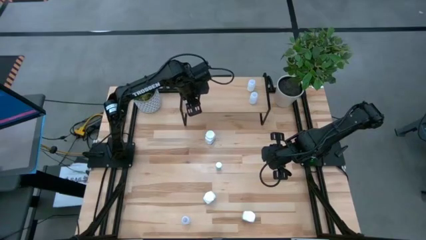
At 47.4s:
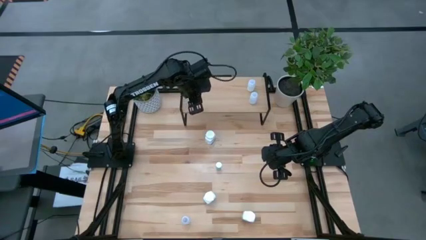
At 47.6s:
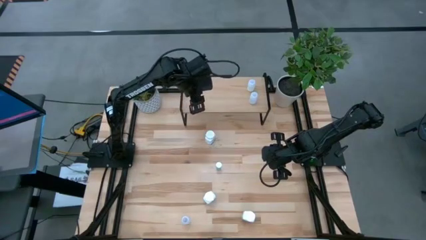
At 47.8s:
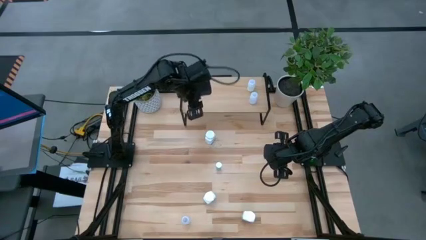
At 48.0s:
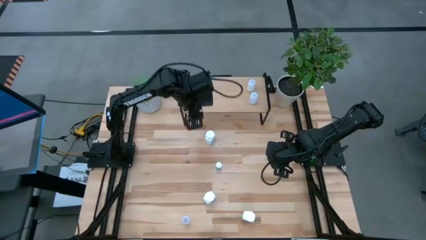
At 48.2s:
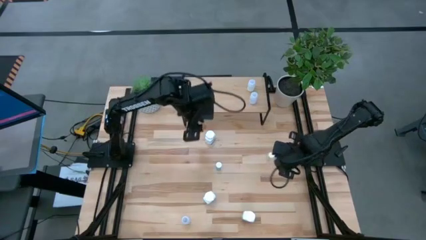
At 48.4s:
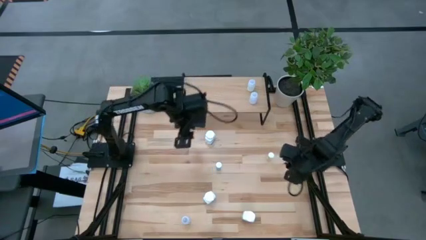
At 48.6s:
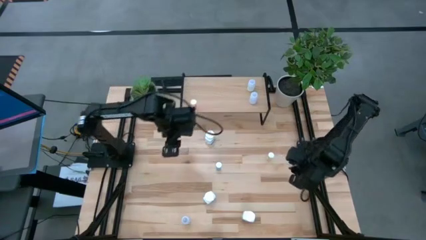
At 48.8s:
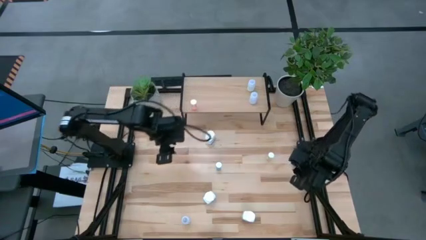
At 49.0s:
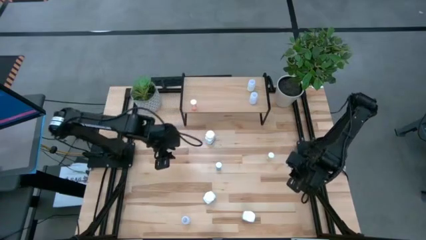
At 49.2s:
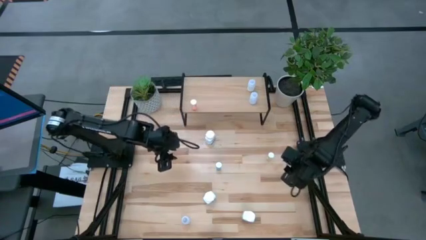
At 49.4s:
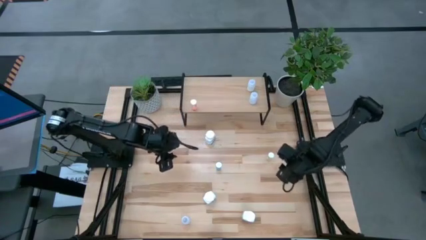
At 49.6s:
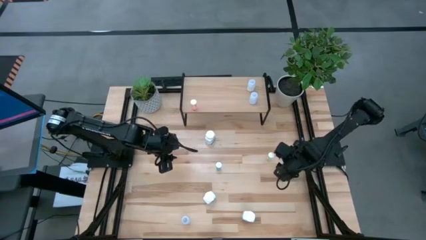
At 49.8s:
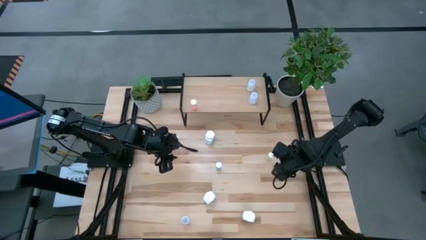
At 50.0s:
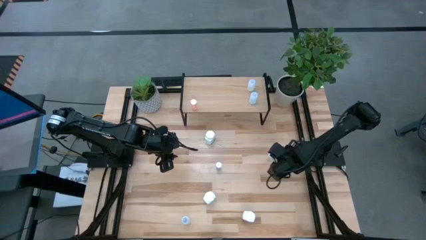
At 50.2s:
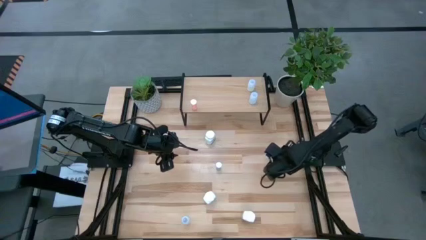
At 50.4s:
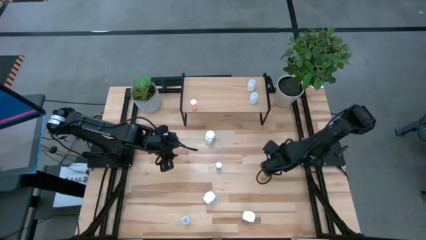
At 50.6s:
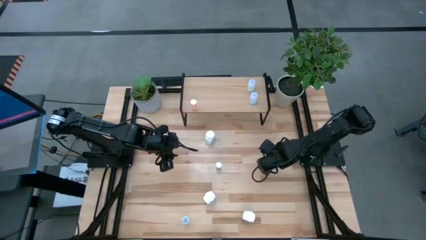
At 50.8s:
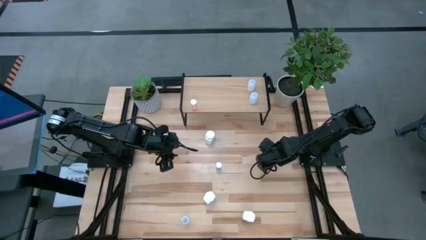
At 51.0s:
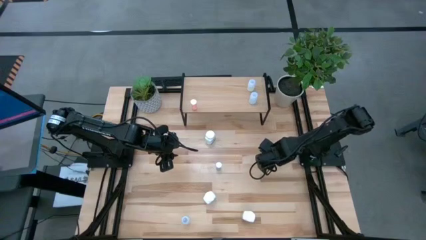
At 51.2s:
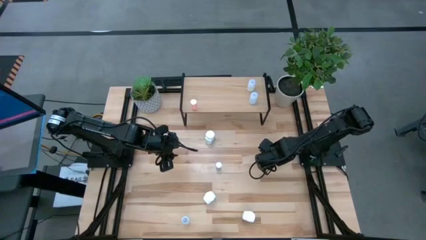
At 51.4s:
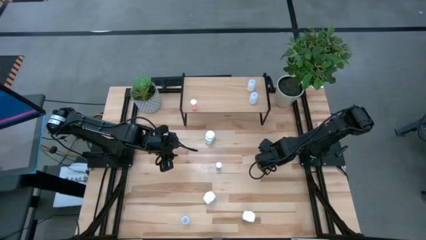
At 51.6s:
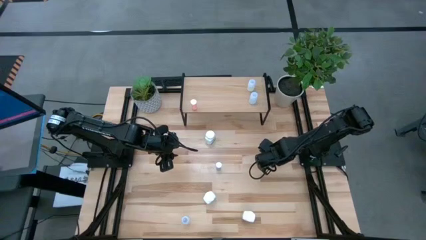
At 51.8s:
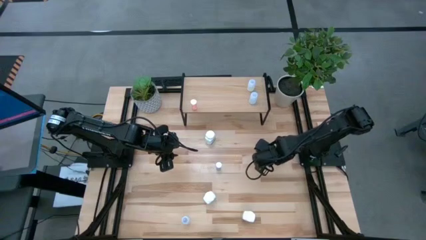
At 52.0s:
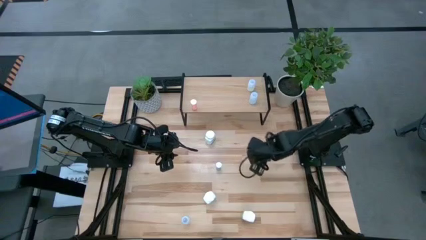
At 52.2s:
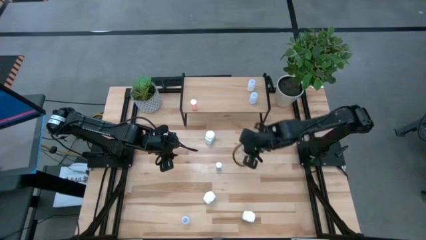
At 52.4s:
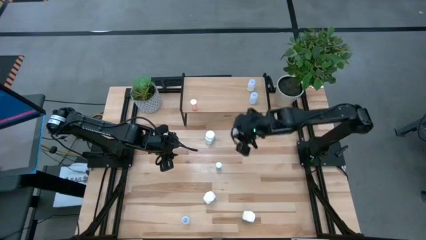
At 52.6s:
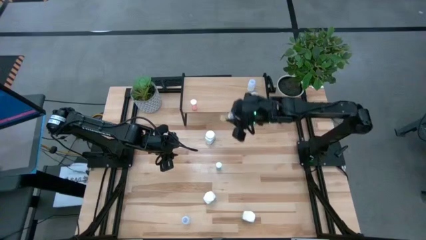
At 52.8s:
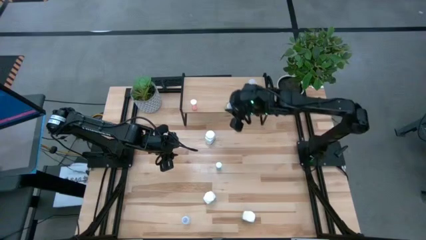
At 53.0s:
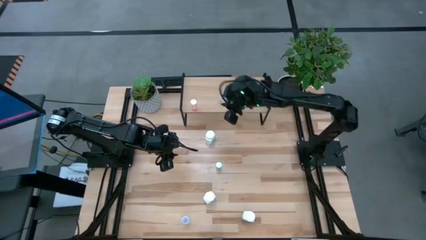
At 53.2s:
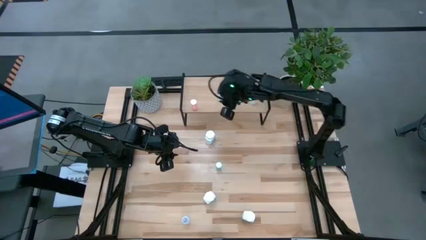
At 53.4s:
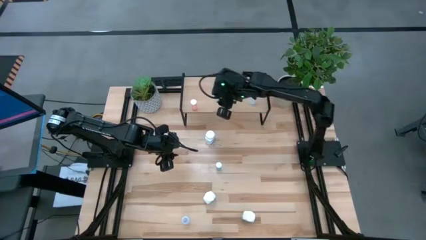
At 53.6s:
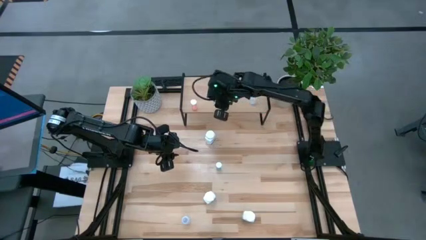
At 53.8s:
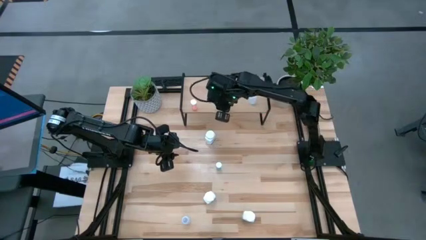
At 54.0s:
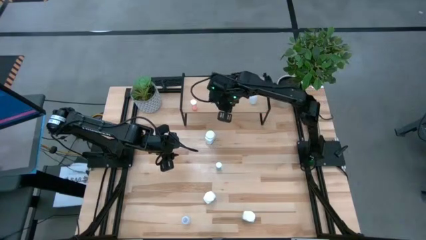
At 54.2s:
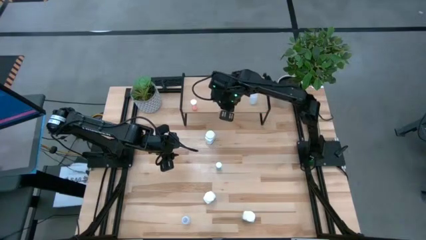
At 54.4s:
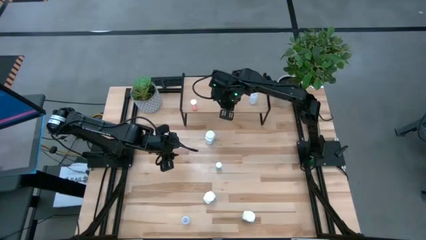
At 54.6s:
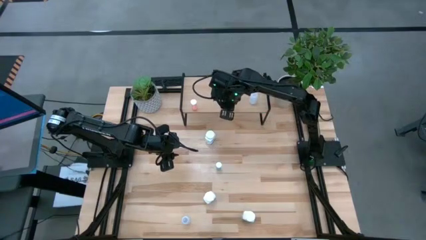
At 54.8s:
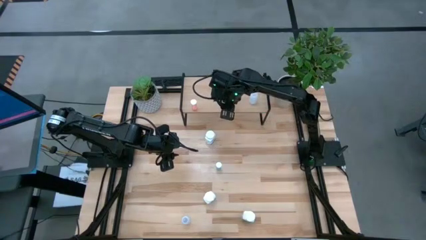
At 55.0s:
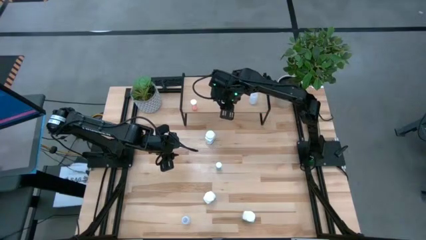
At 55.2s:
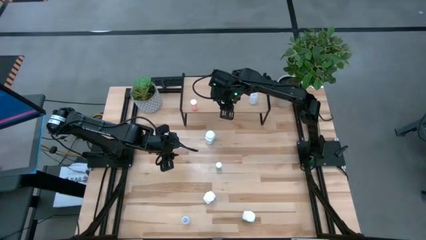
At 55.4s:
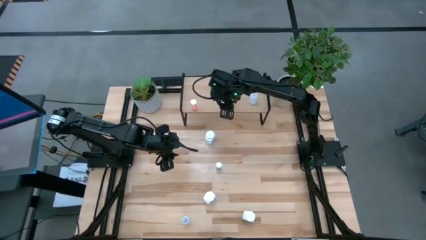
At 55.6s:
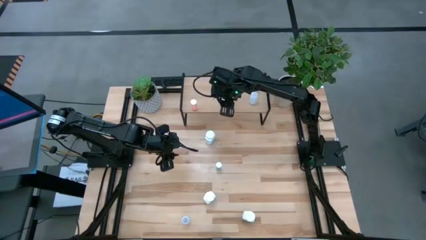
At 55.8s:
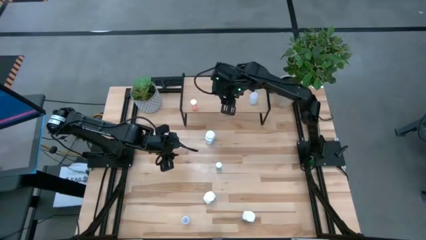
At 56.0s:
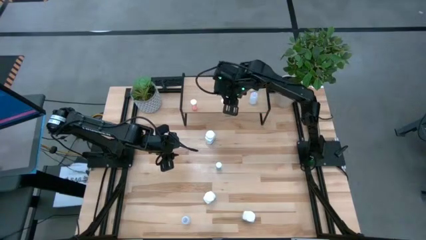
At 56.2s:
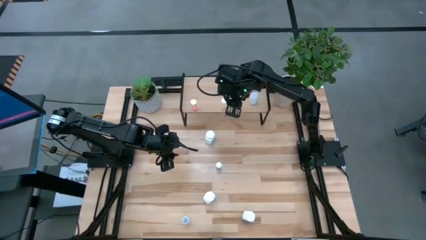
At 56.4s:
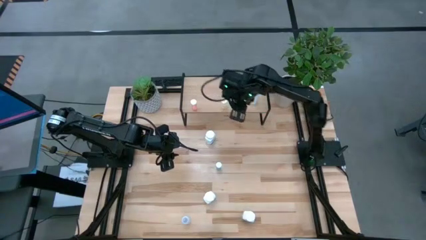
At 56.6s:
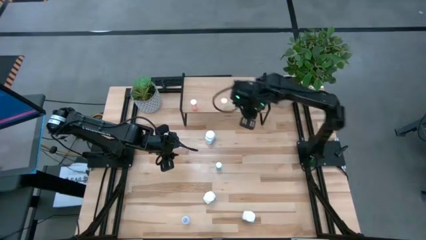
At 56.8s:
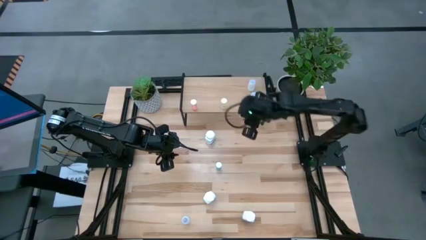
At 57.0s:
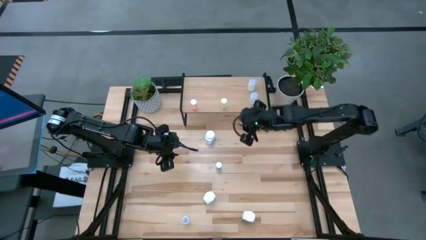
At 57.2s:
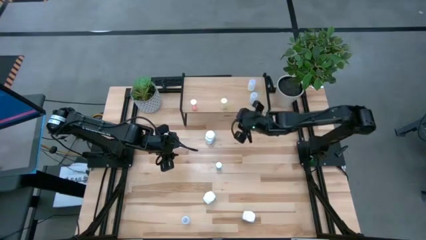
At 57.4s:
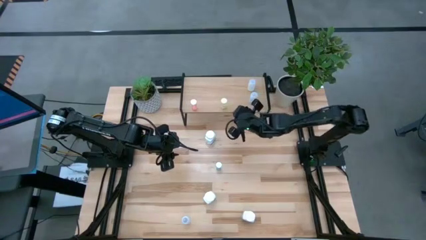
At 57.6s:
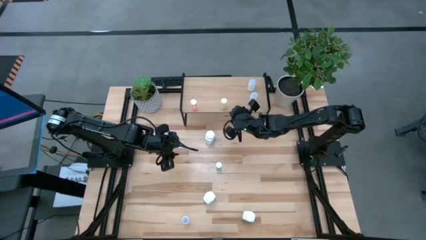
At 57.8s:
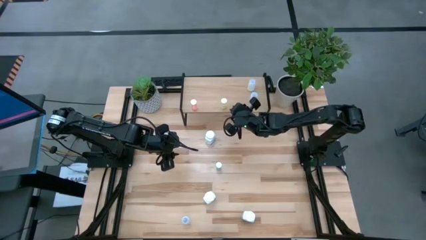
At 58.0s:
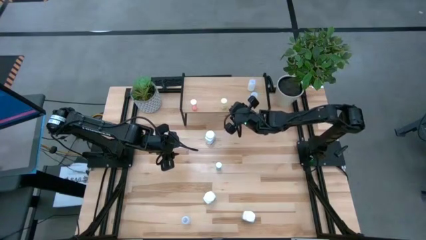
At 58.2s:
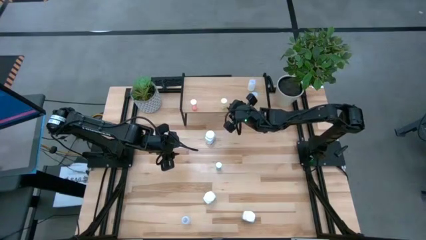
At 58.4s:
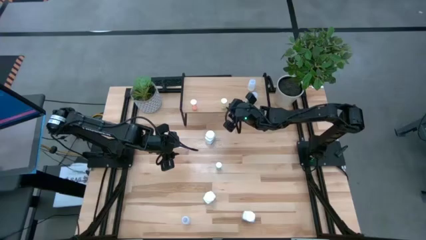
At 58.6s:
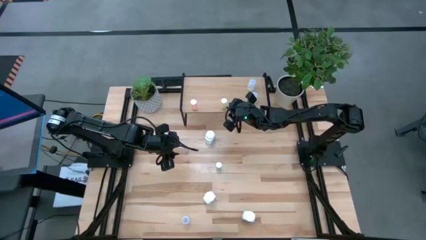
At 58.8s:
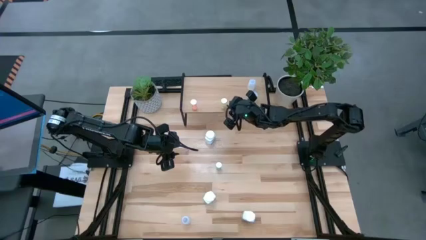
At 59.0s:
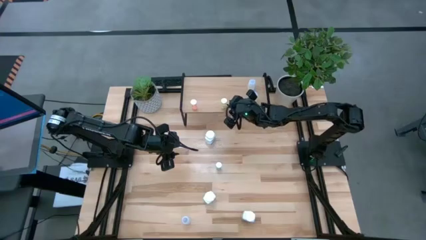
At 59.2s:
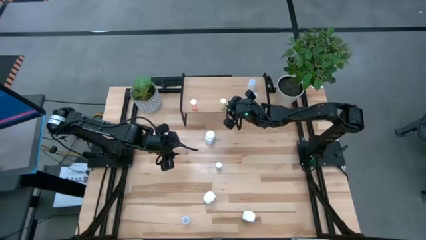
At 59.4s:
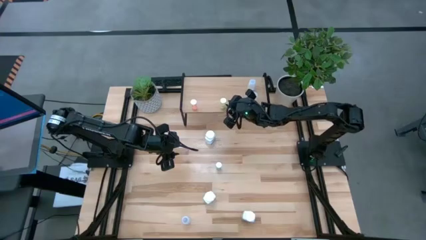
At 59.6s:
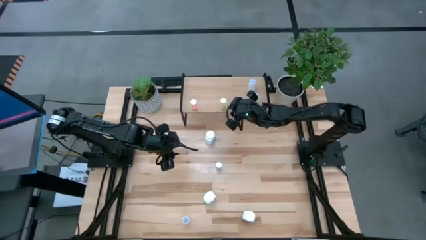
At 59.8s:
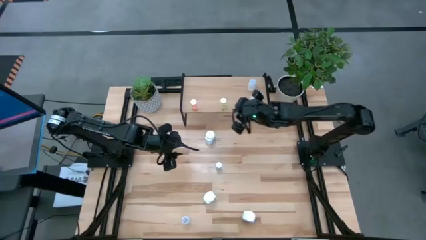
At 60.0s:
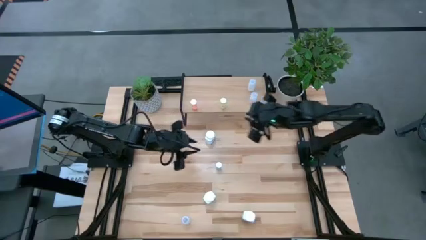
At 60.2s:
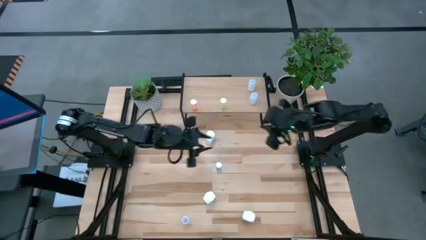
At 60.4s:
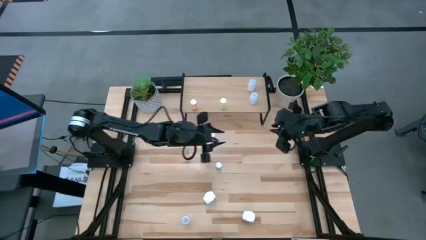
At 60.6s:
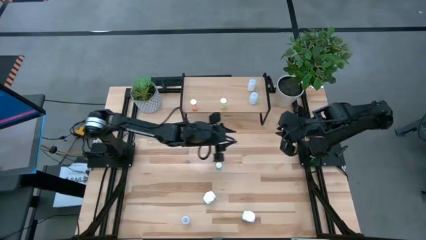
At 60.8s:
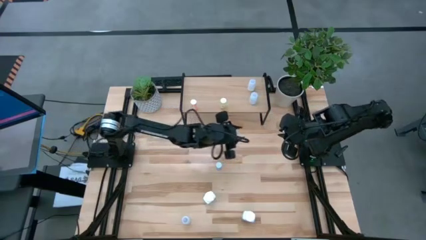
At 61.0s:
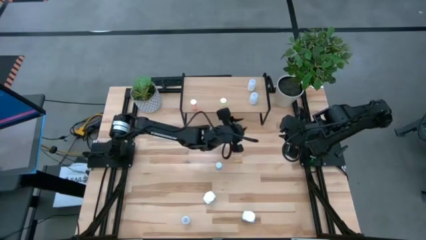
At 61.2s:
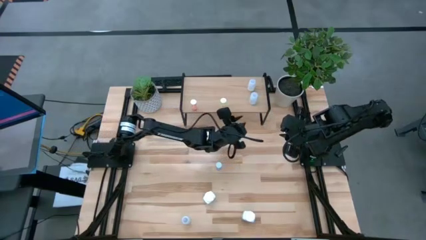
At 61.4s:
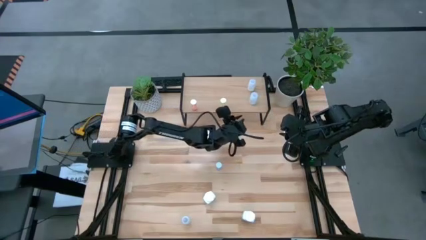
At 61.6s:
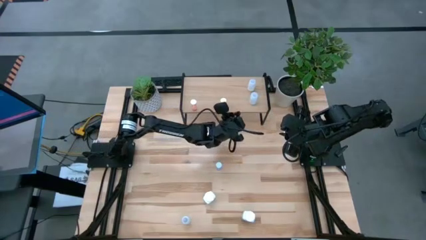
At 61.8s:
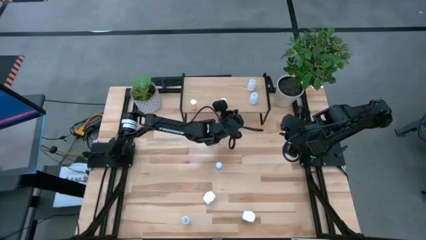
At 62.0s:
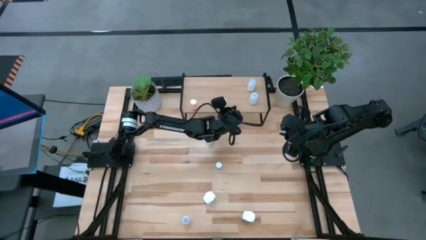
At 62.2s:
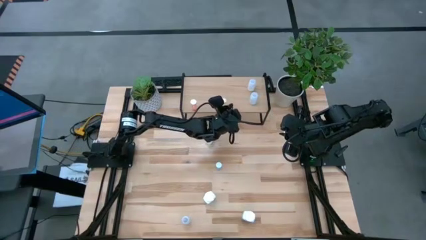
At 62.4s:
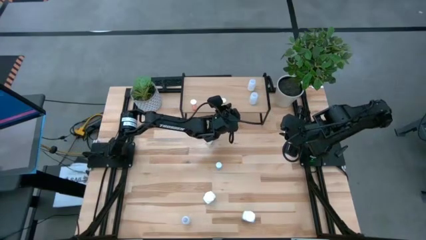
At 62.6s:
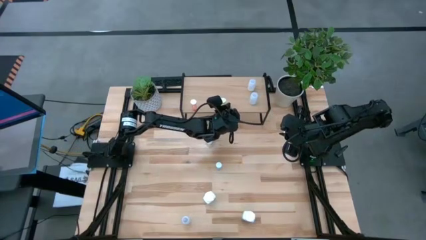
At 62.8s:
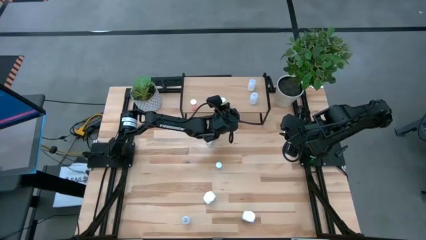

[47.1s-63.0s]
Task: Pick and place medicine bottles onto shelf by color
Put the yellow pill bottle on the shelf
